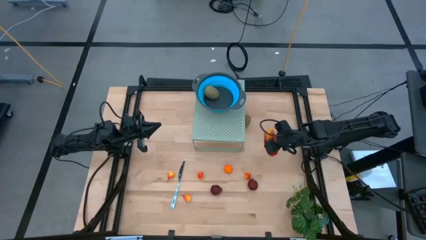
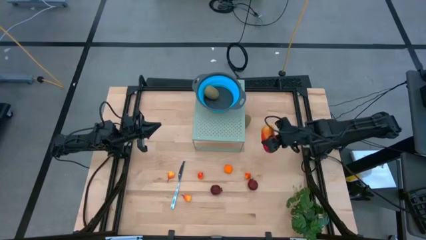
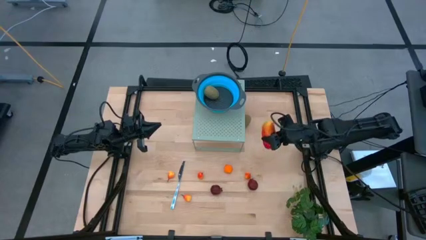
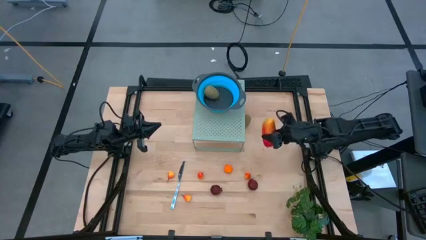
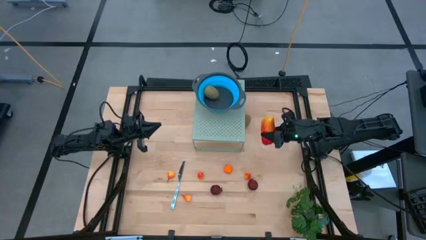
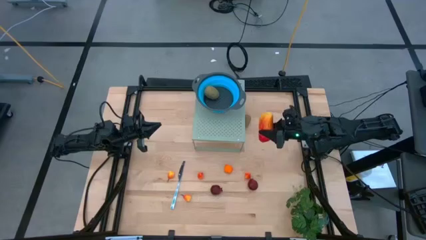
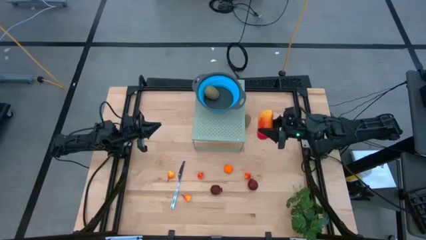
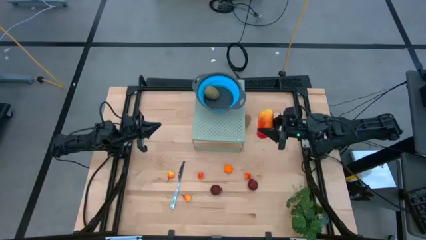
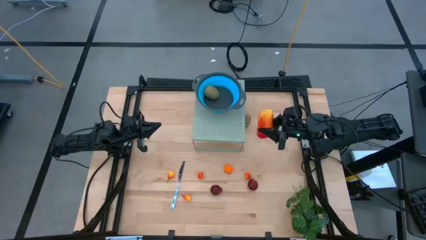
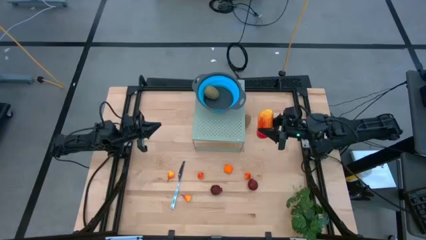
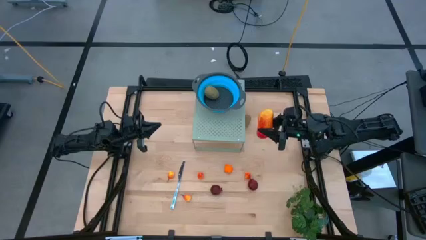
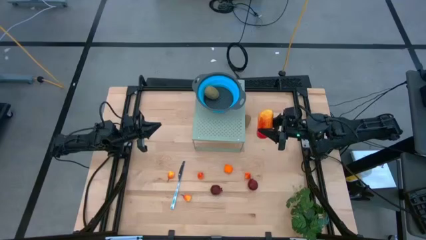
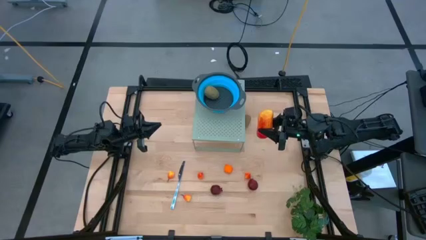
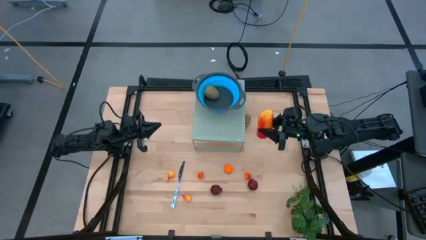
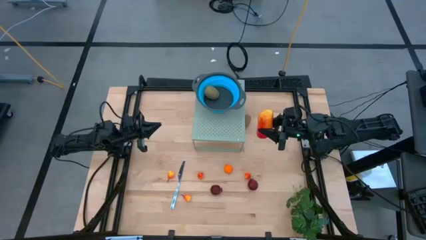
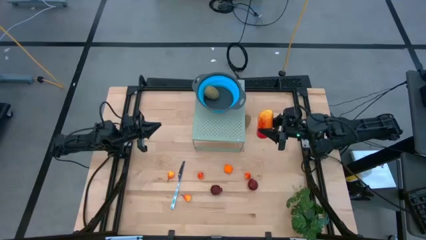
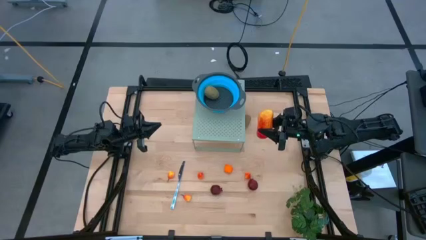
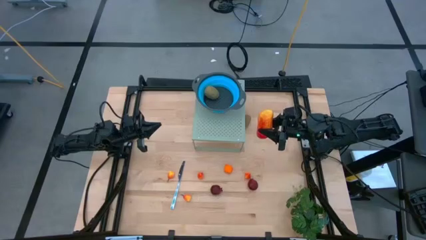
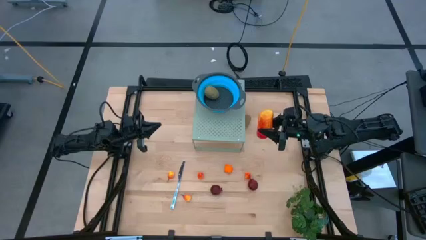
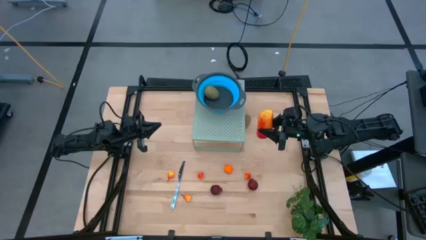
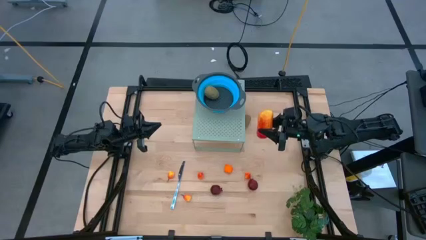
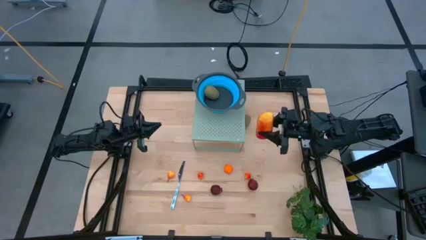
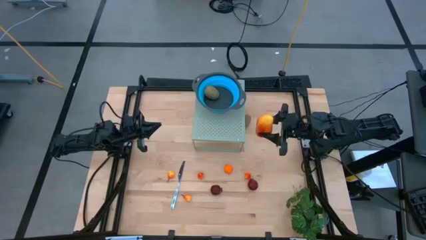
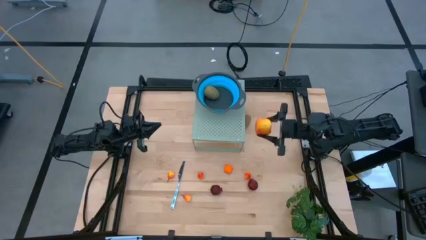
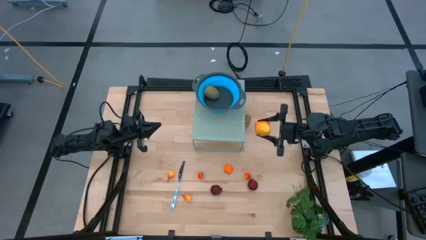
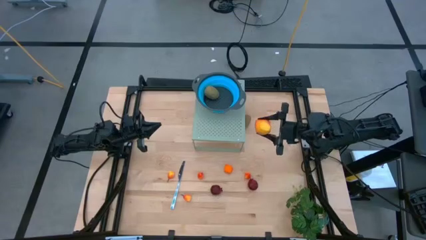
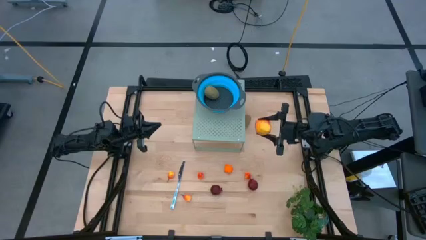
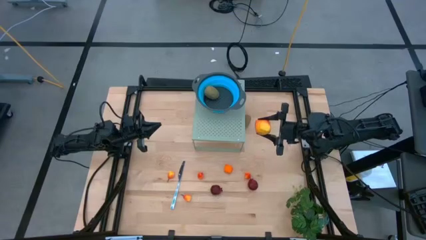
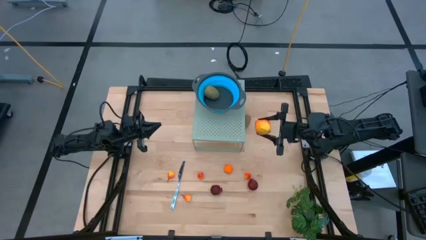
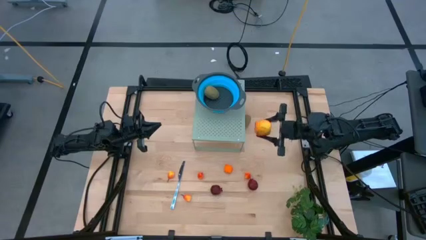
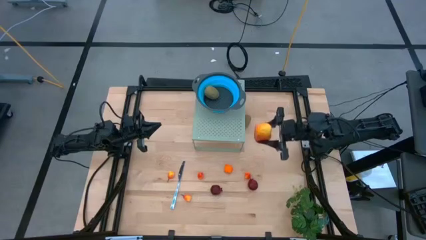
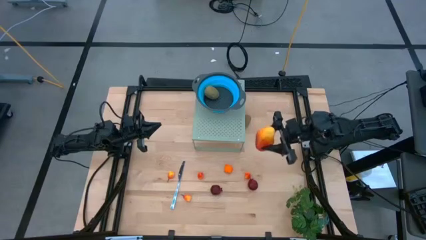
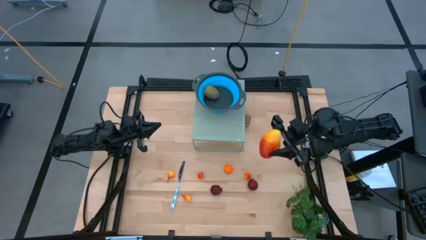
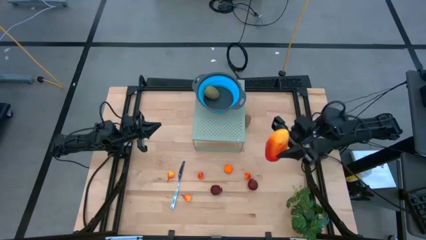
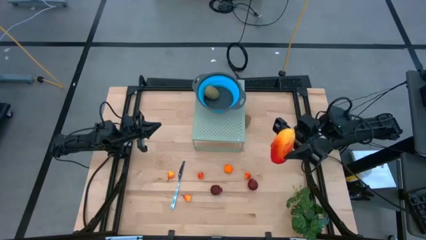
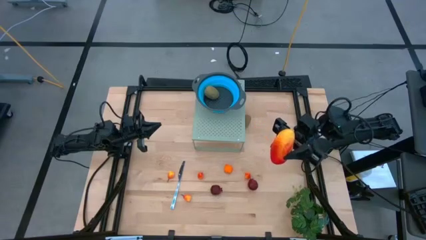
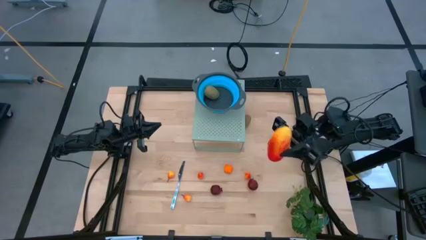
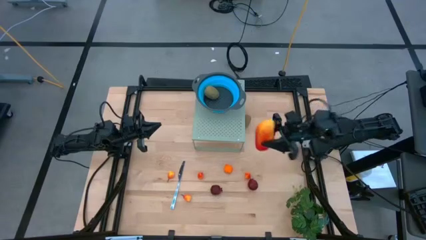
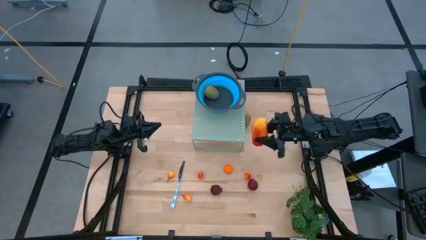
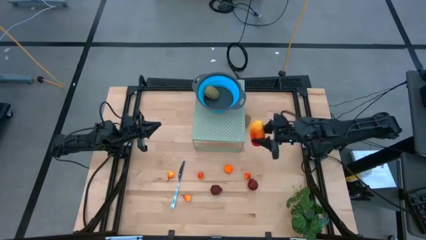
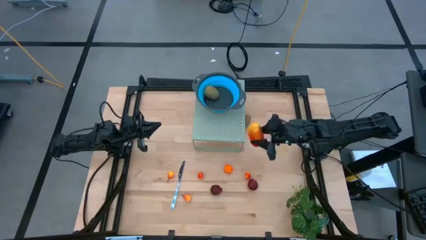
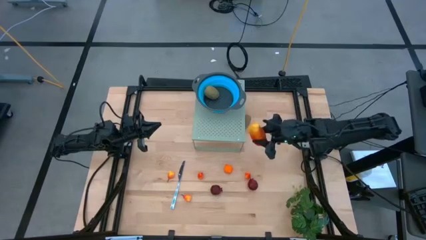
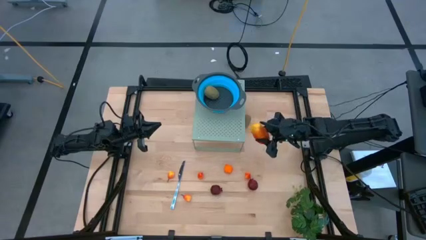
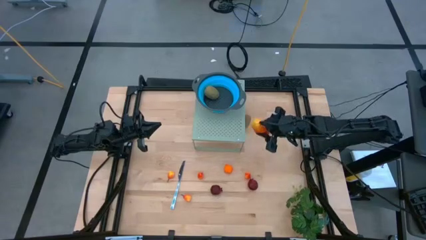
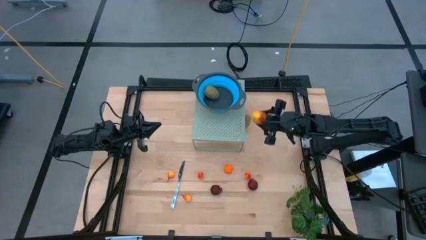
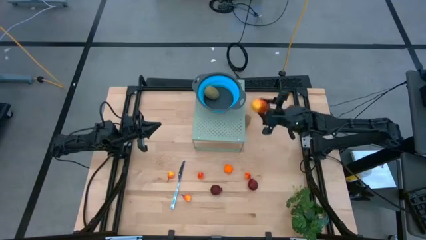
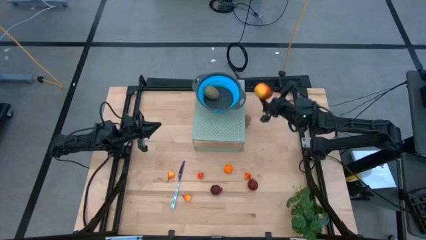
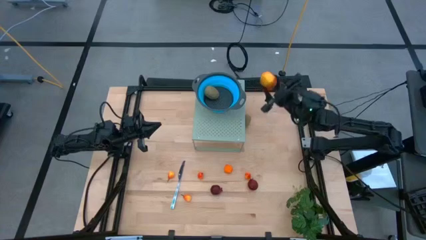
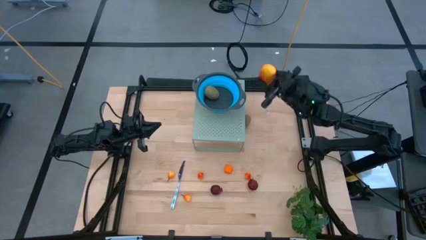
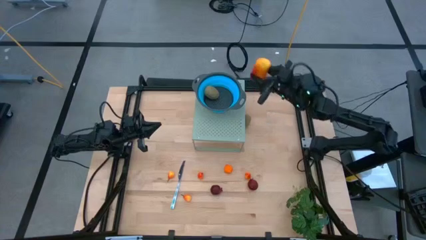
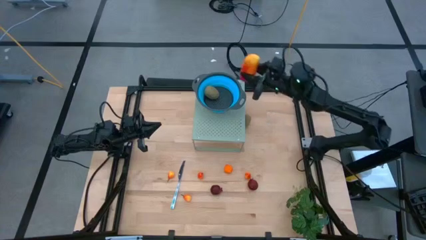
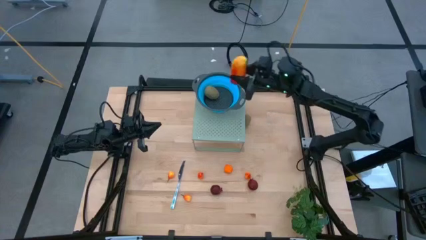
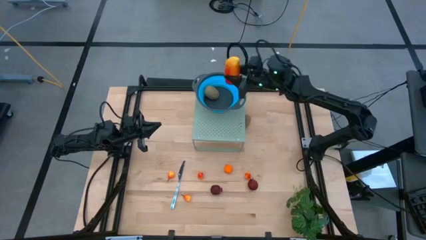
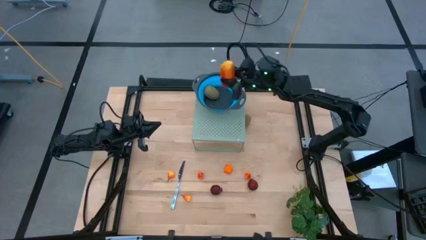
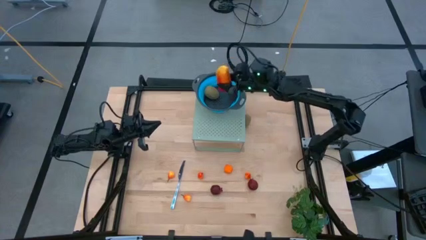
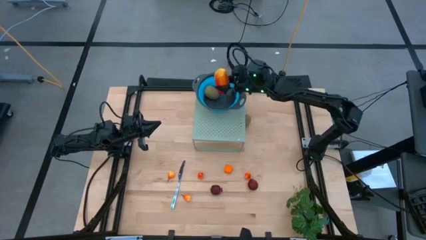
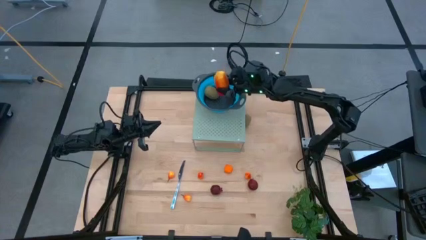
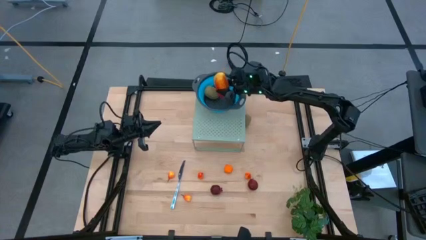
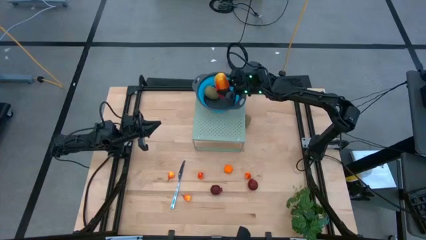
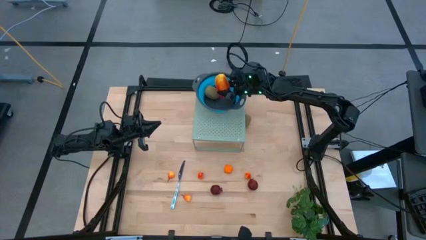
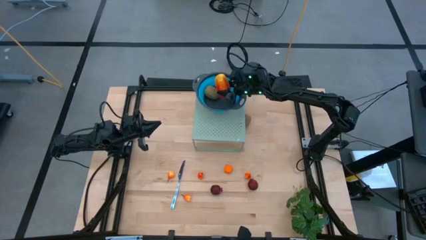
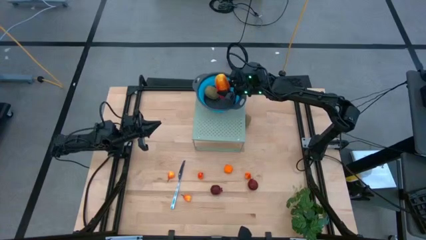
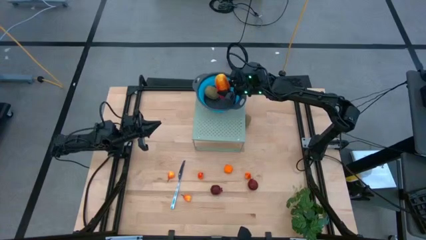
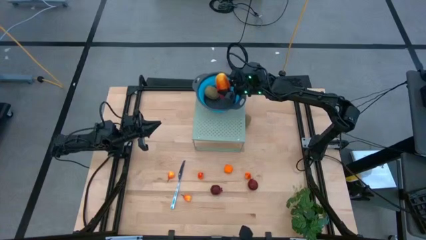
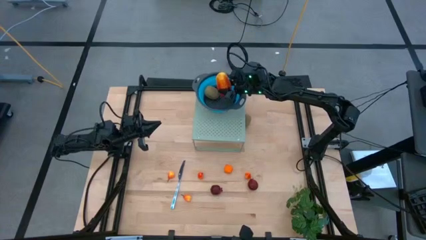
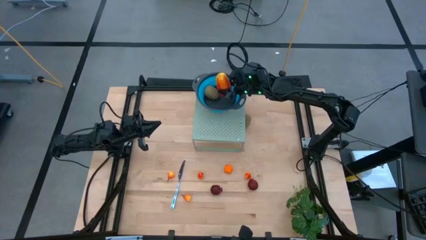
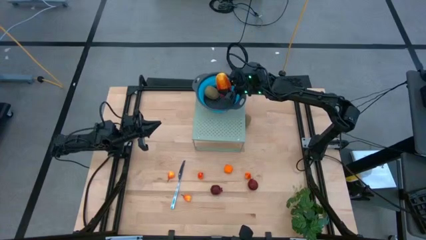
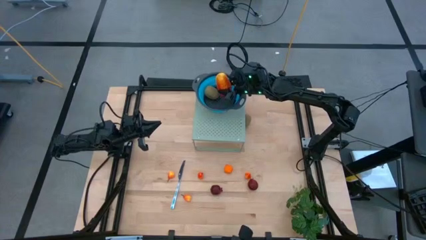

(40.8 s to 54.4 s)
Task: Pick & Place Fruit
Put the mango into the blue strainer bowl on the shelf

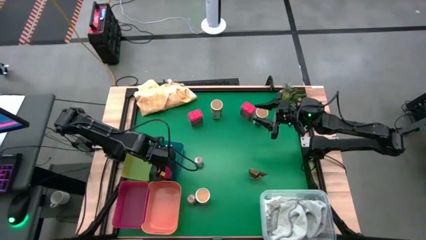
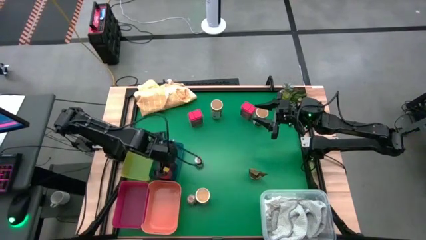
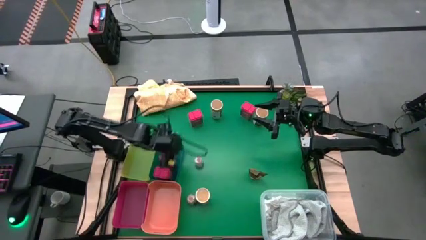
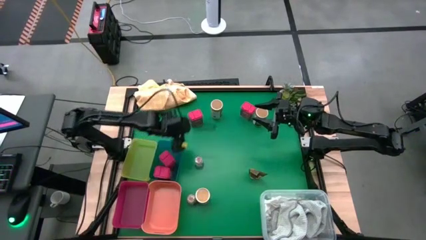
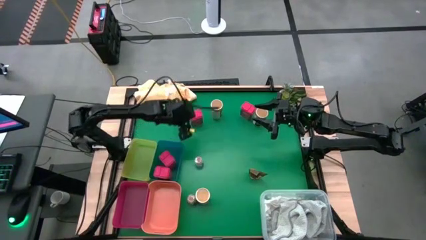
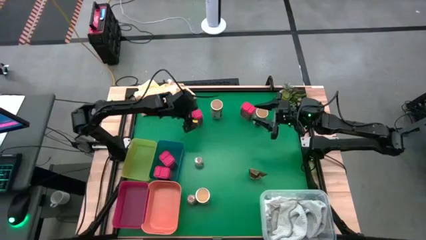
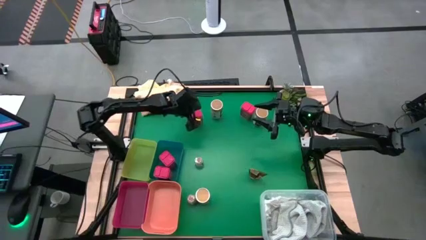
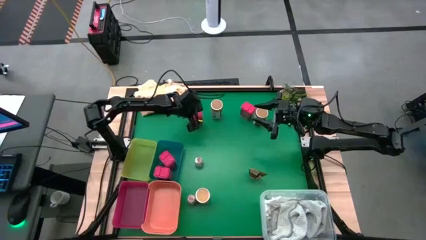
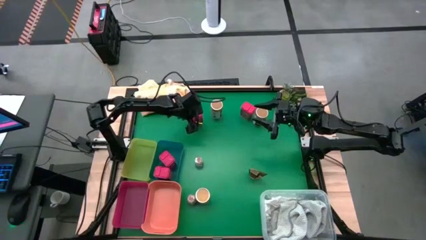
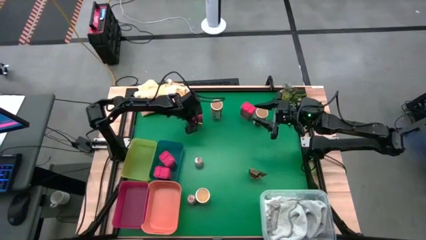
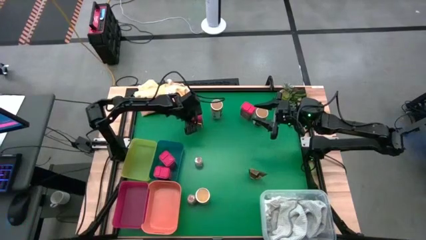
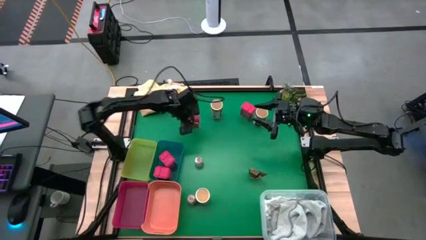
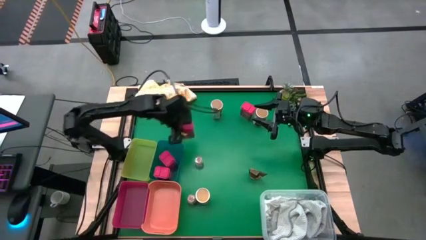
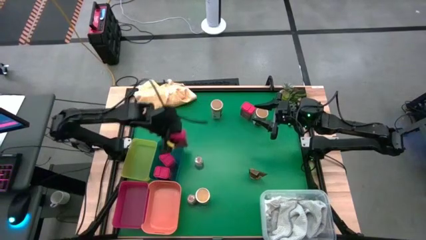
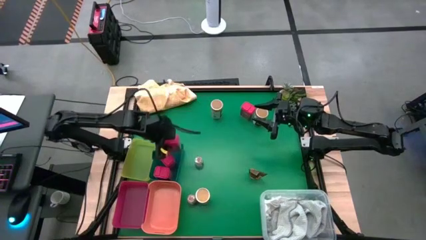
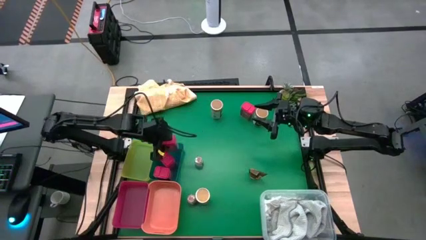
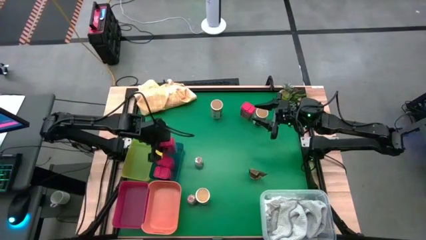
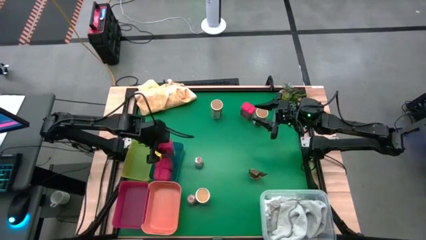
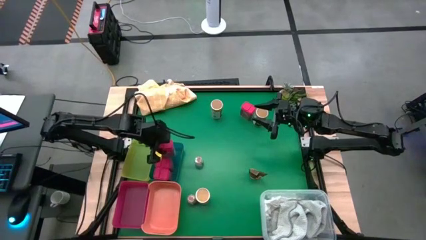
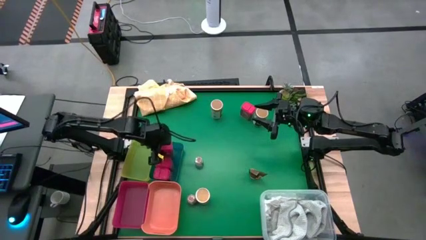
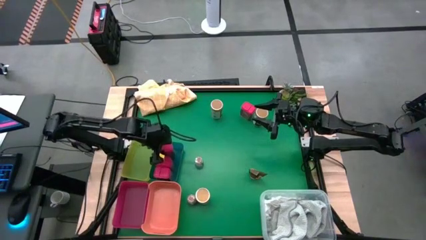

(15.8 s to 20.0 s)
Task: Sort spices by type
Put the red seasoning can into the blue bin
